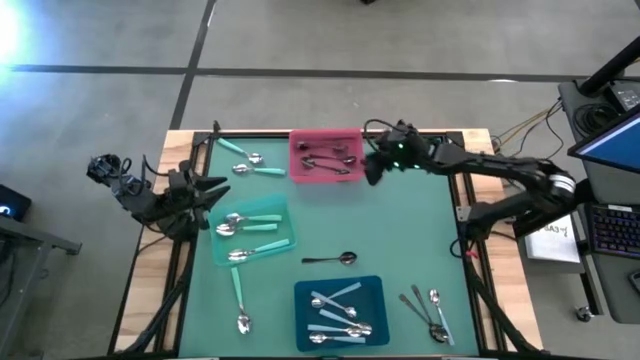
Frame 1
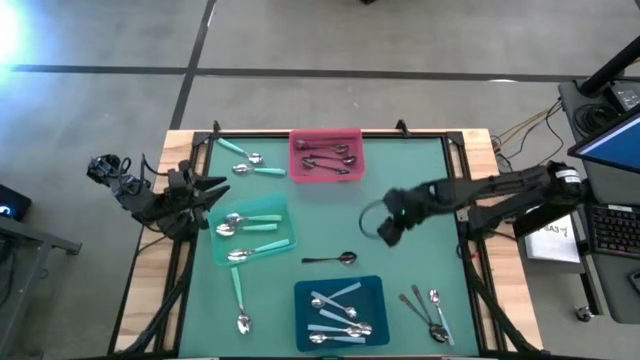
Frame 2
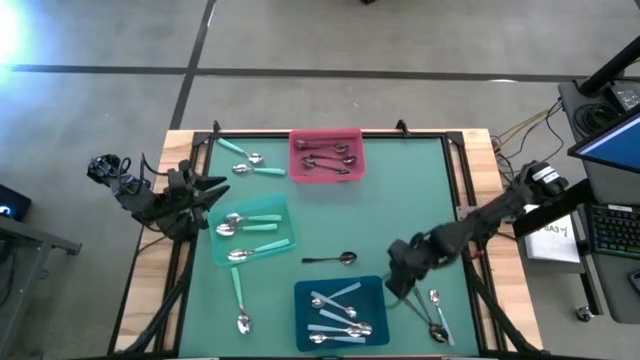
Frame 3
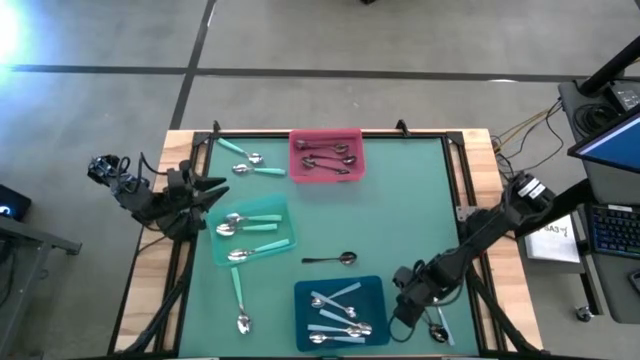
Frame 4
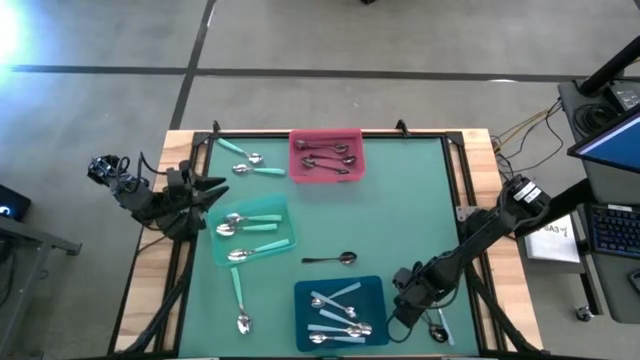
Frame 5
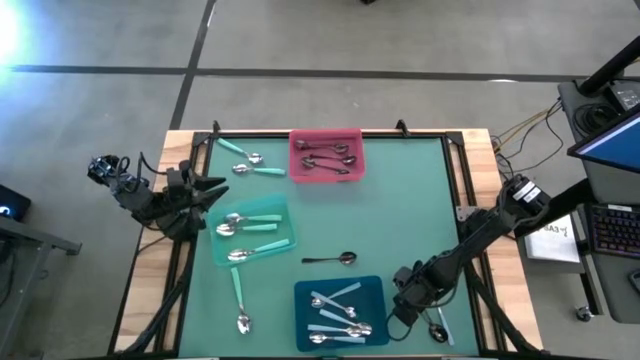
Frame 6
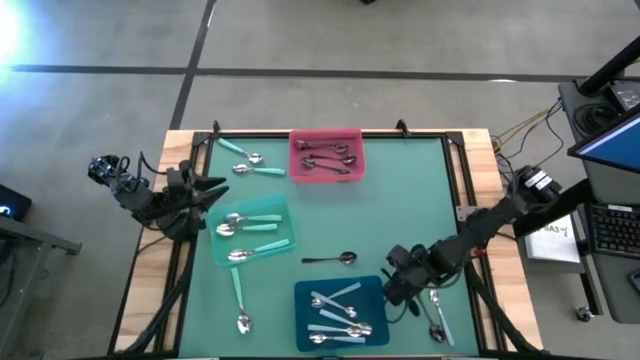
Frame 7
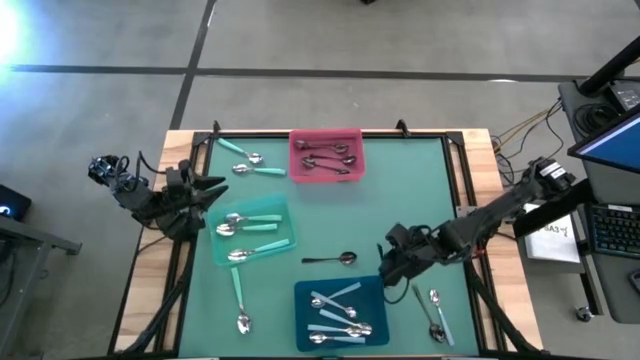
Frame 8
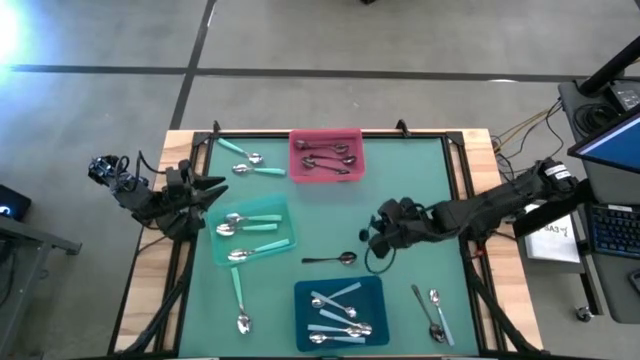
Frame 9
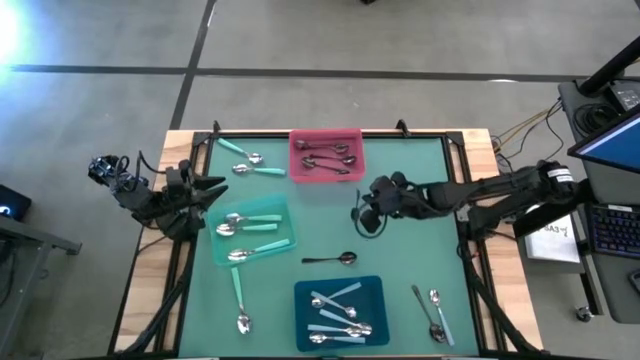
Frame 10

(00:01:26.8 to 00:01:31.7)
Task: Sort silverware by color (type)
Put the black spoon into the red bin

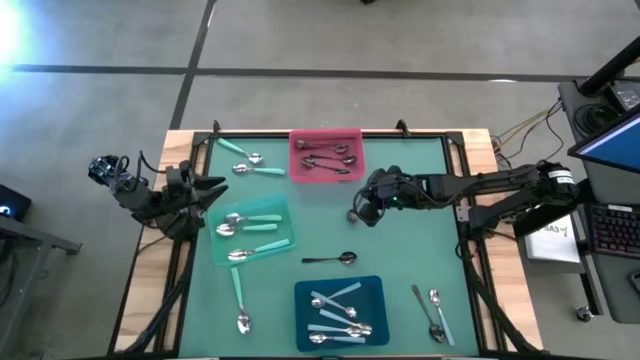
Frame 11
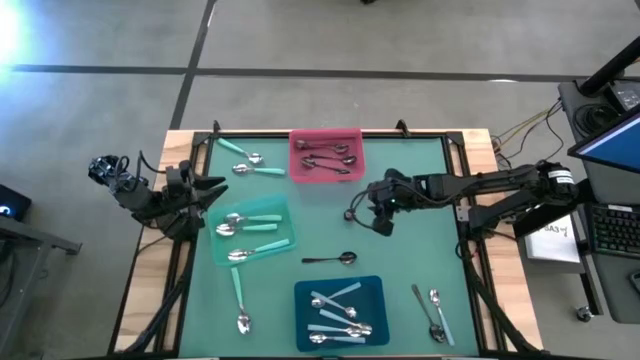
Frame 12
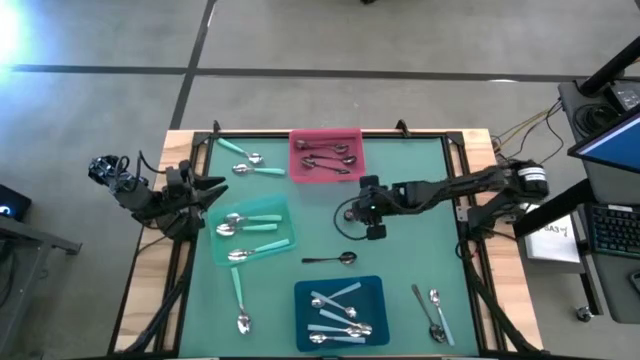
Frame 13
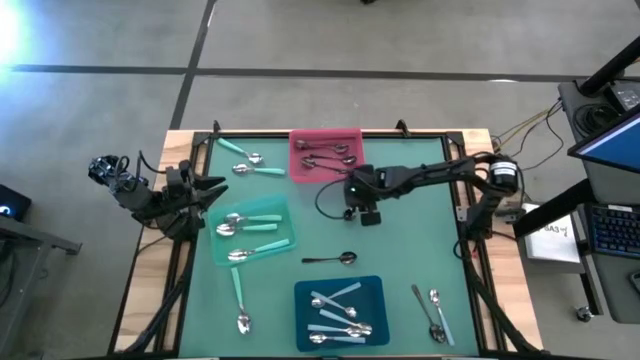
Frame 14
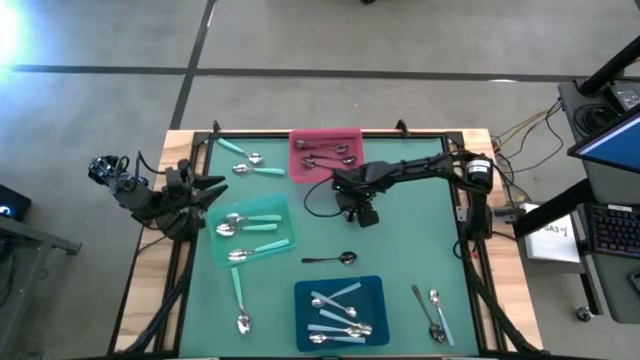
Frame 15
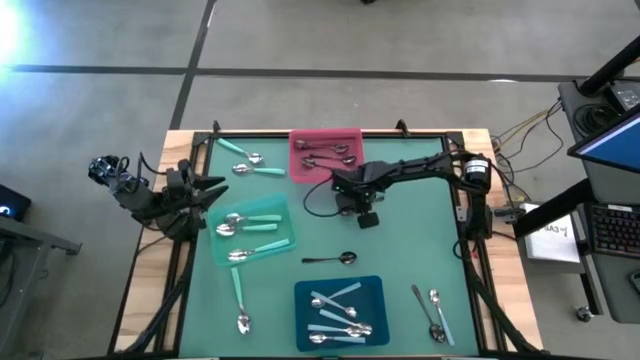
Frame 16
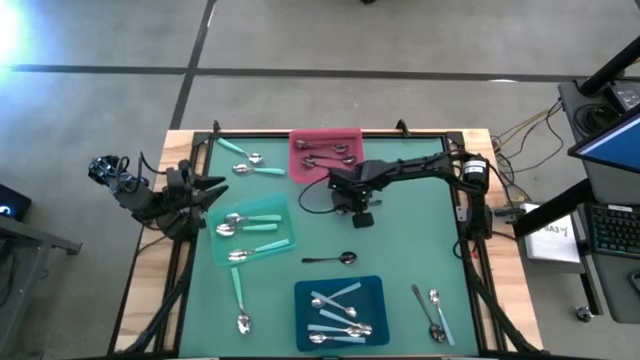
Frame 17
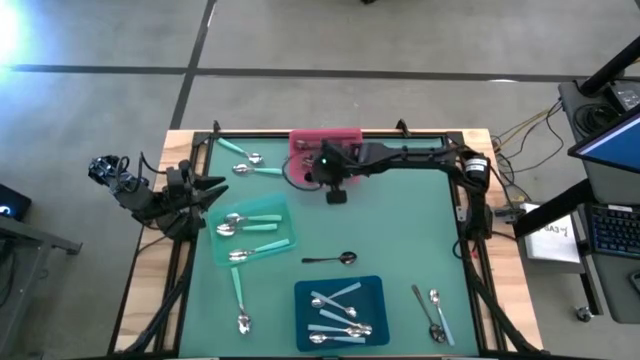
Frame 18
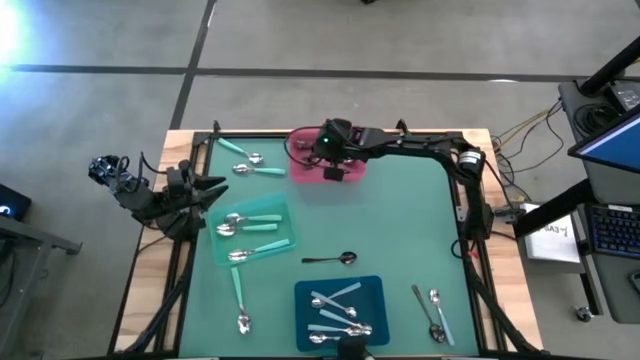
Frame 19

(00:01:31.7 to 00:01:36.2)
Put the black spoon into the red bin

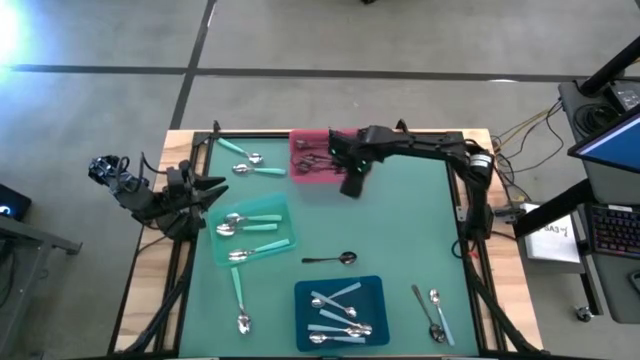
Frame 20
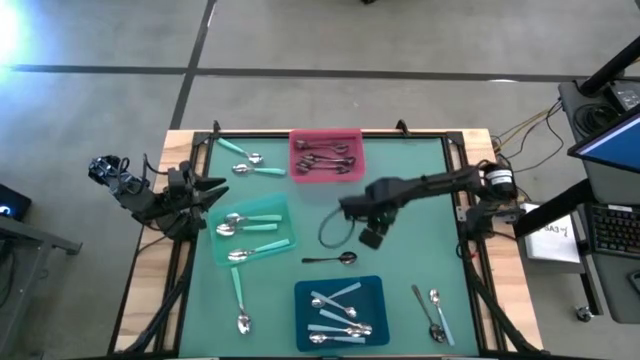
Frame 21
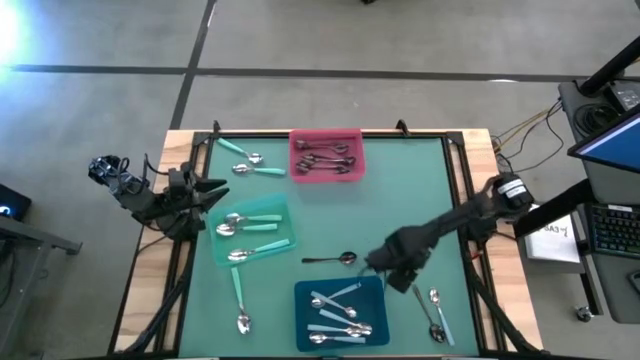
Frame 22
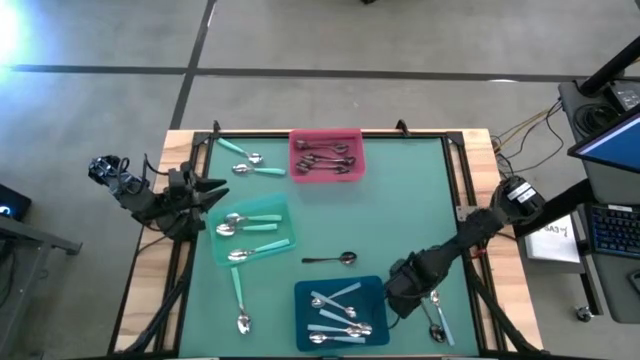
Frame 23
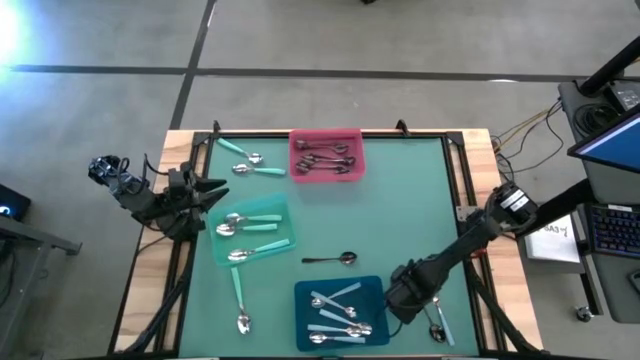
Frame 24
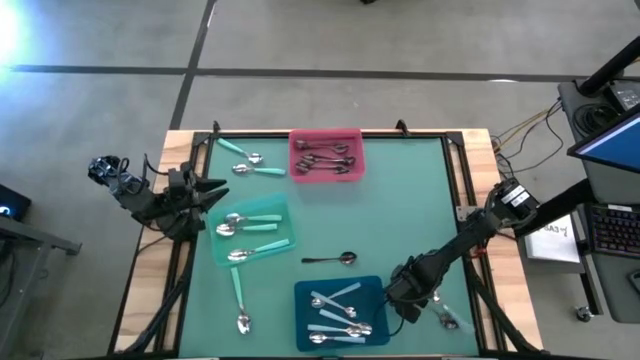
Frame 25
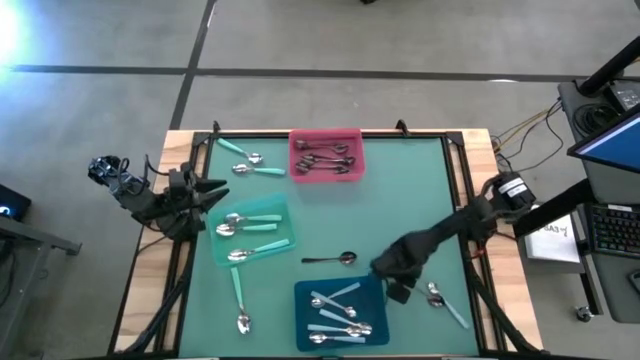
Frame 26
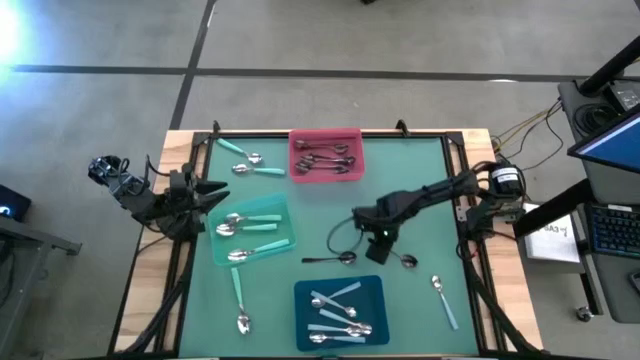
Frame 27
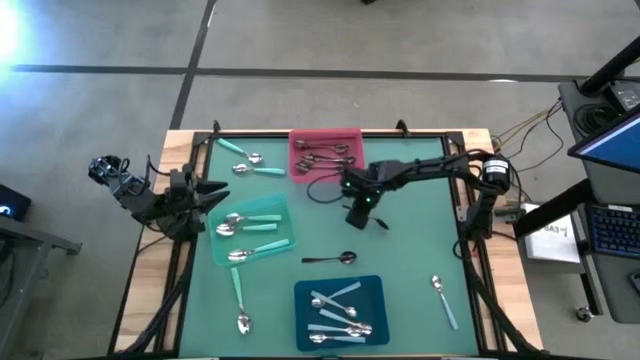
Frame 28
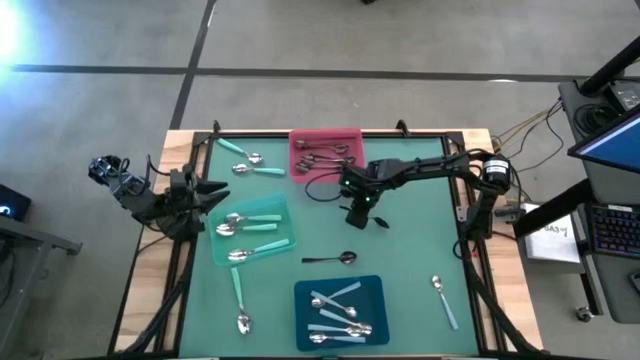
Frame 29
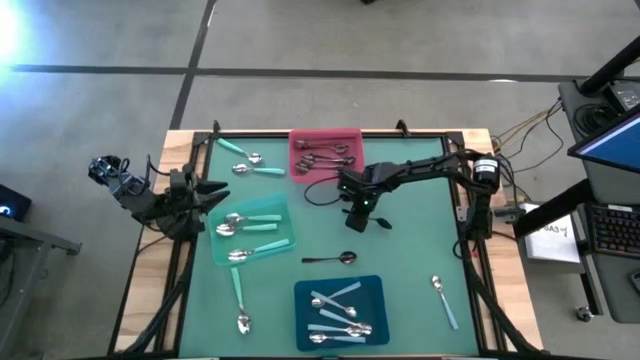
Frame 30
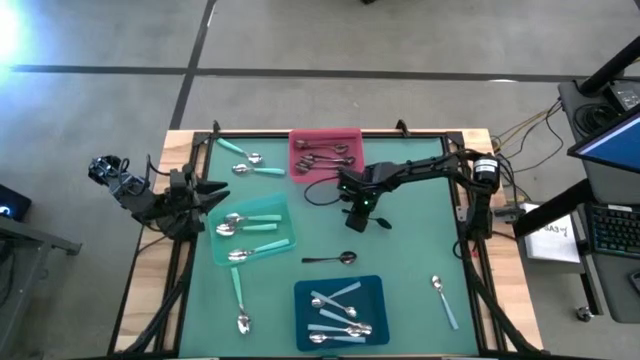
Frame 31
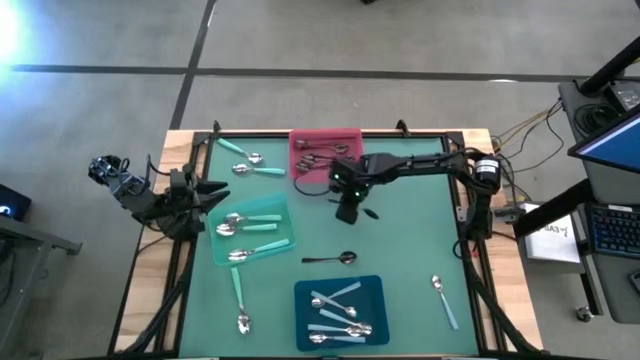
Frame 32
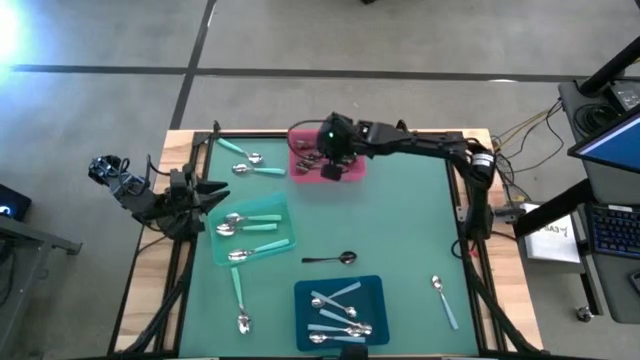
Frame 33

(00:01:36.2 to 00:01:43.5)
Put the black spoon into the red bin

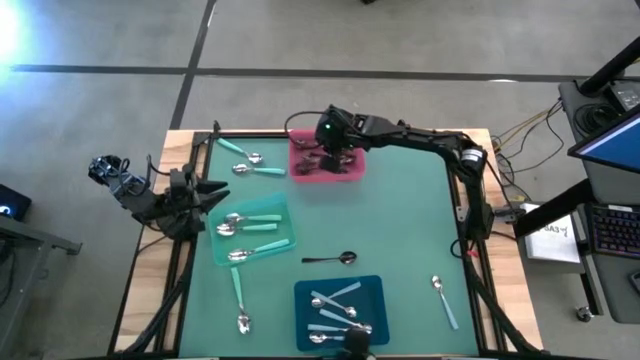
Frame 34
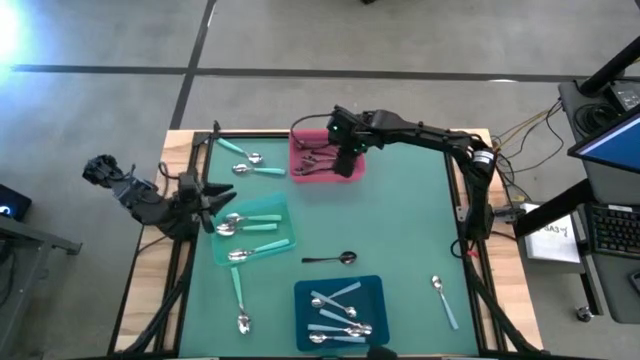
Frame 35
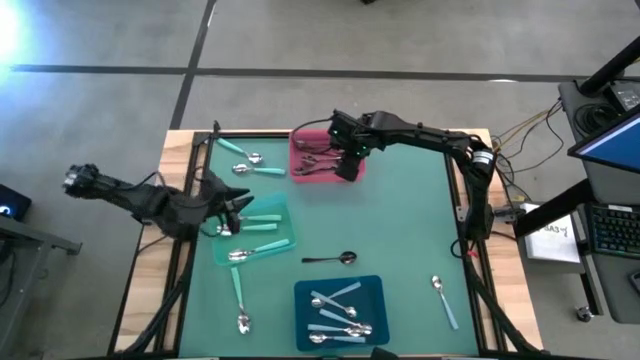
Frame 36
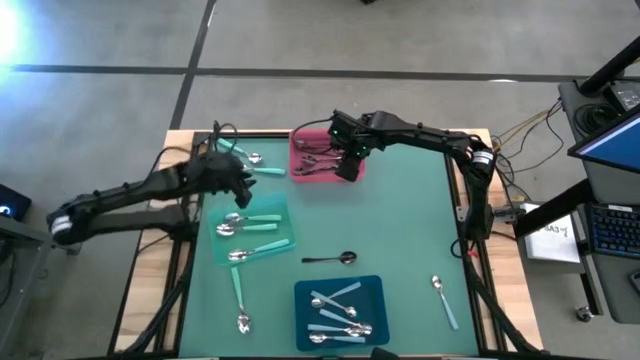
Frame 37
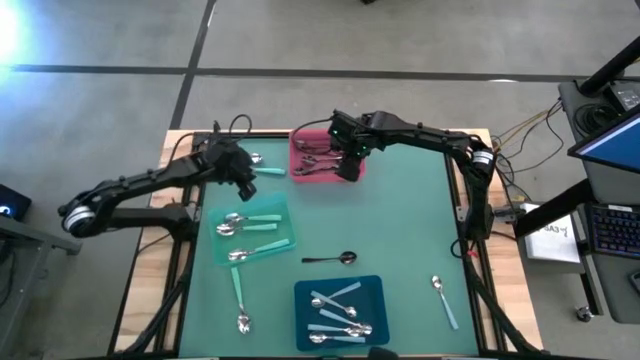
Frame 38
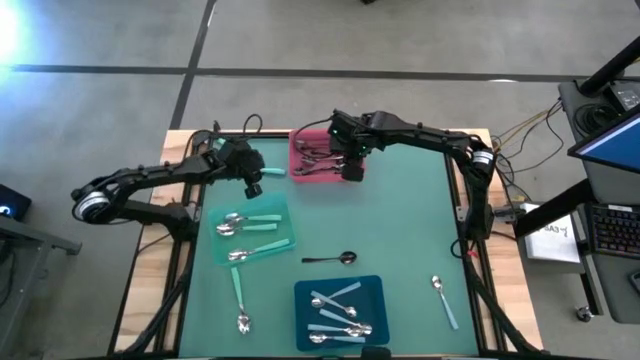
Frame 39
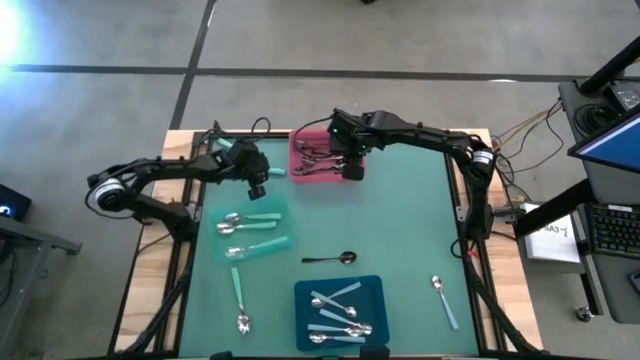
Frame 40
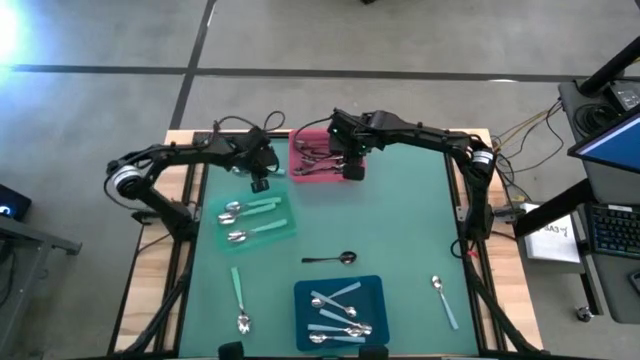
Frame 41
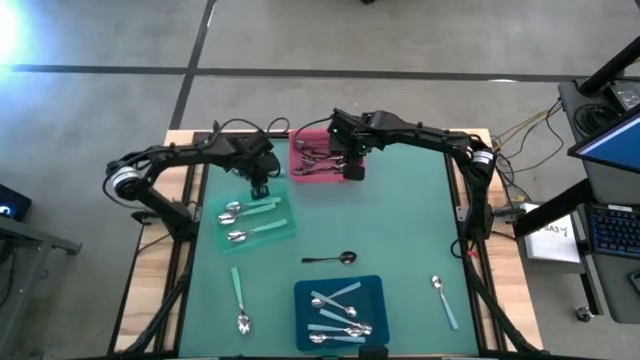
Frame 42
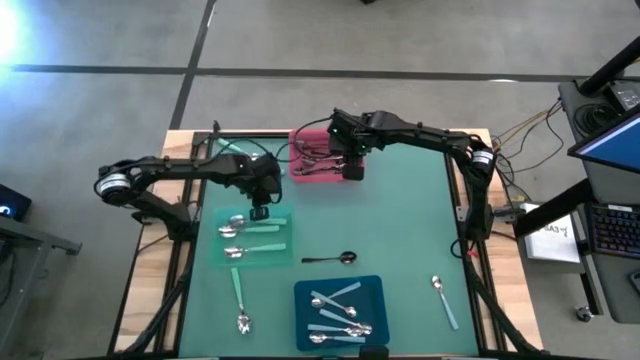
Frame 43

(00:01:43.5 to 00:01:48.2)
Adjust the green bin
